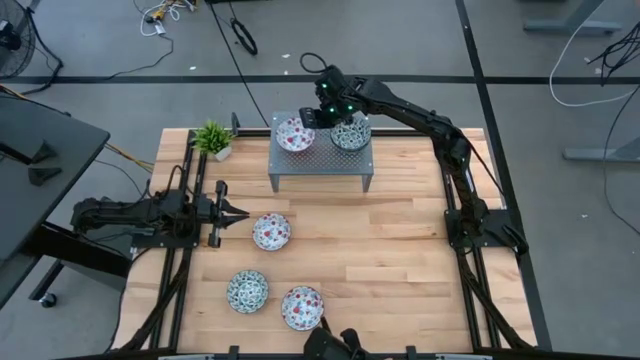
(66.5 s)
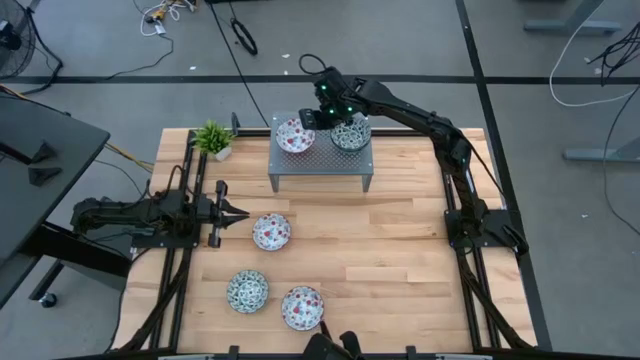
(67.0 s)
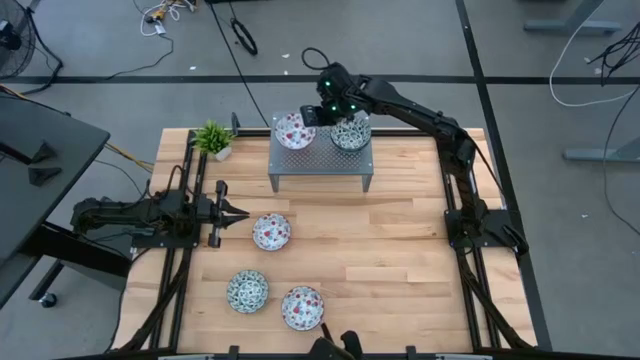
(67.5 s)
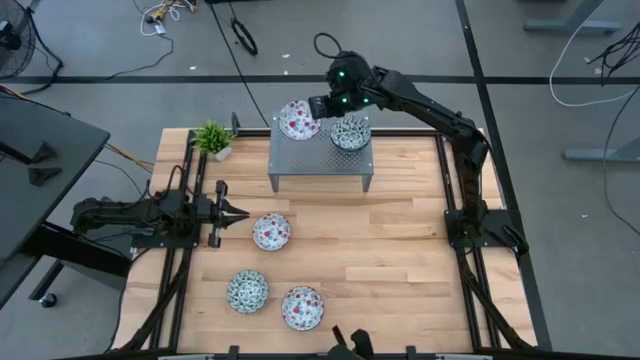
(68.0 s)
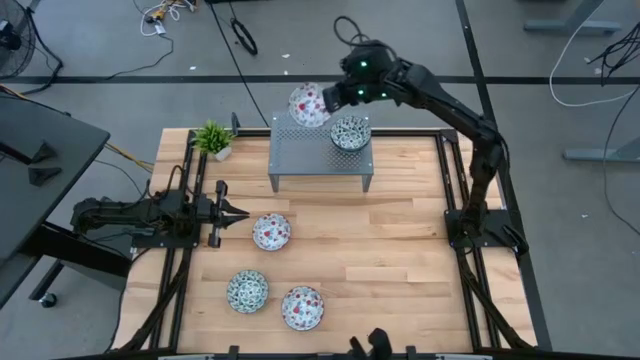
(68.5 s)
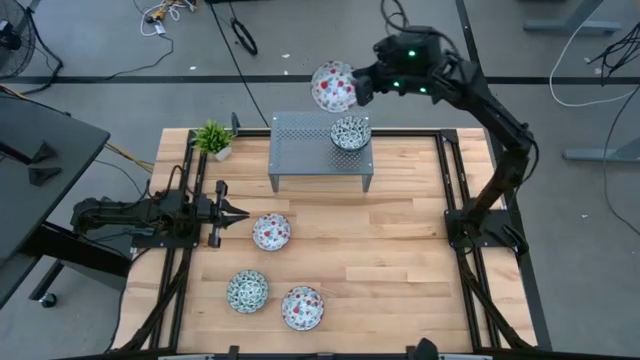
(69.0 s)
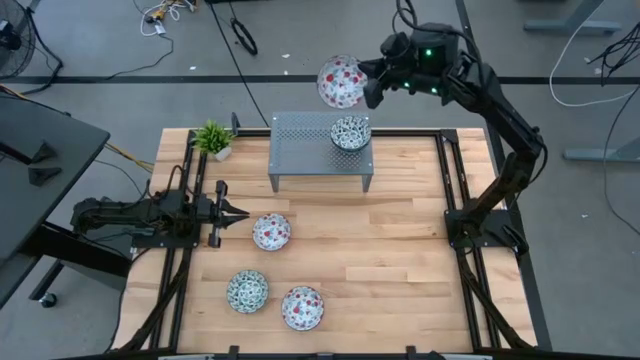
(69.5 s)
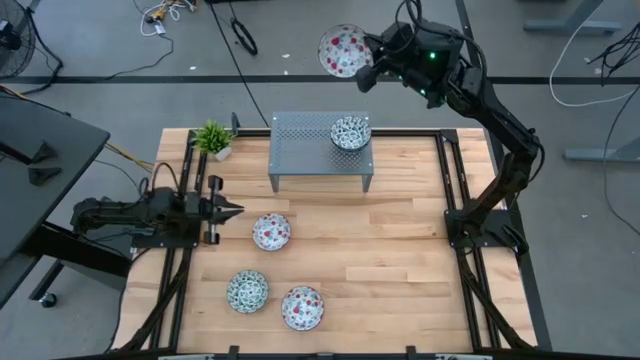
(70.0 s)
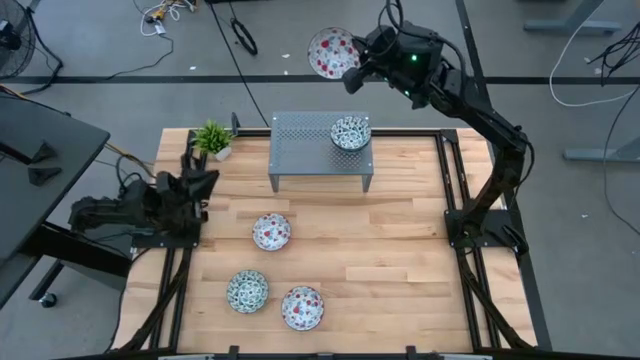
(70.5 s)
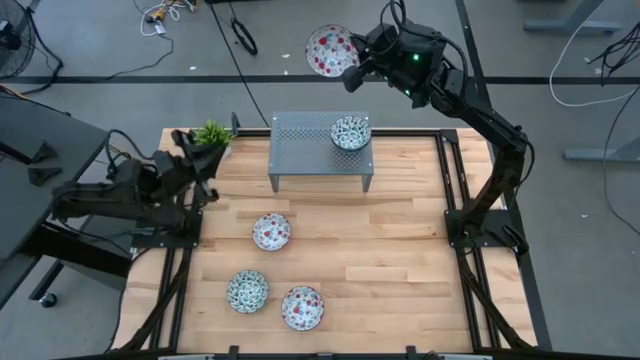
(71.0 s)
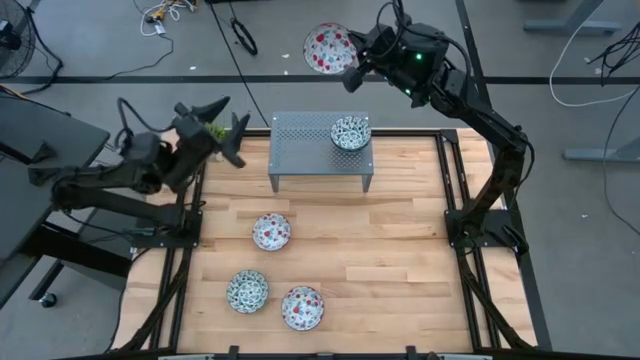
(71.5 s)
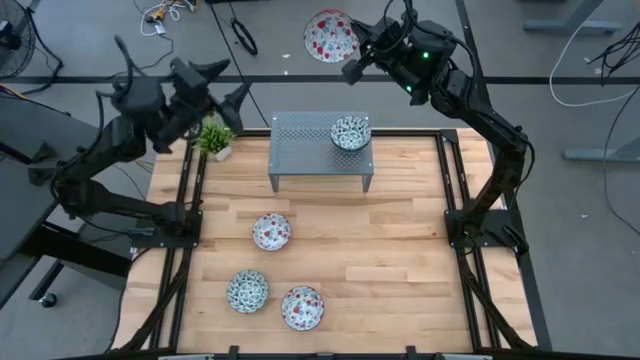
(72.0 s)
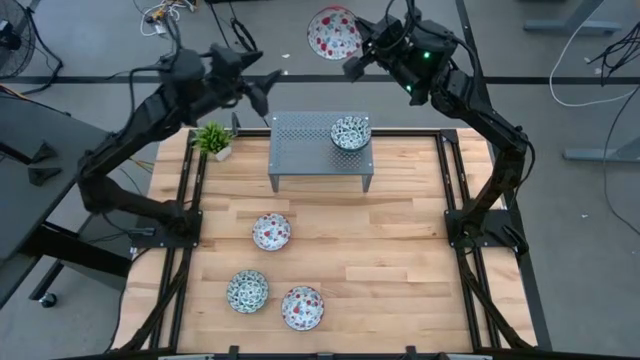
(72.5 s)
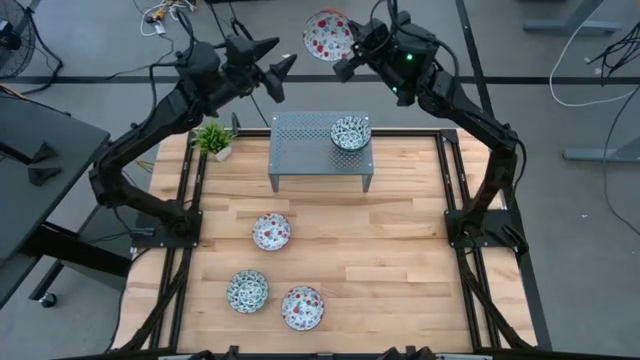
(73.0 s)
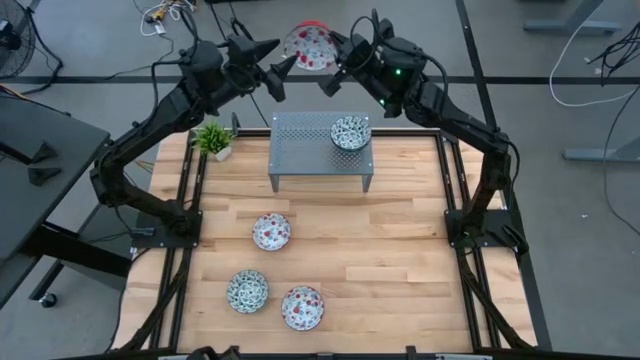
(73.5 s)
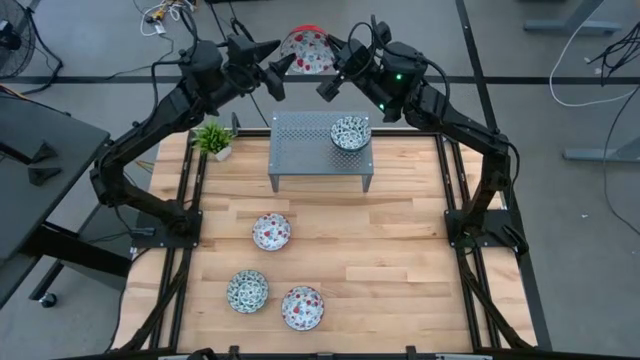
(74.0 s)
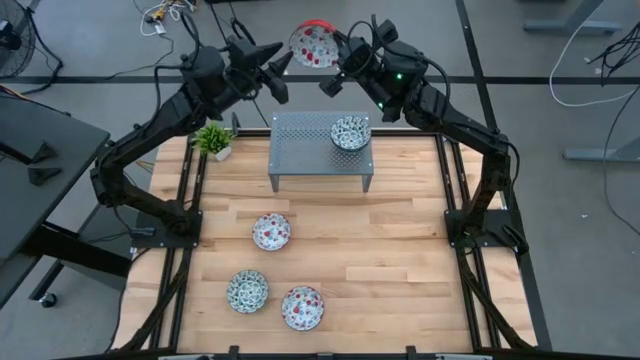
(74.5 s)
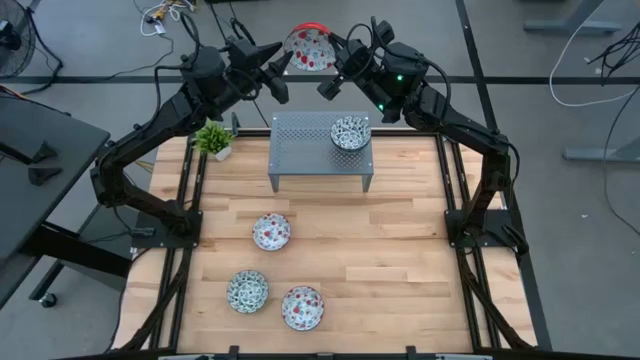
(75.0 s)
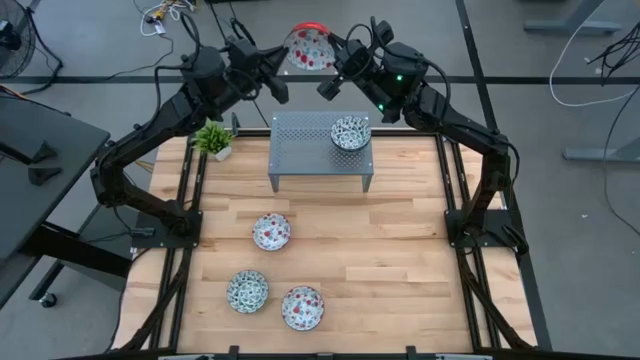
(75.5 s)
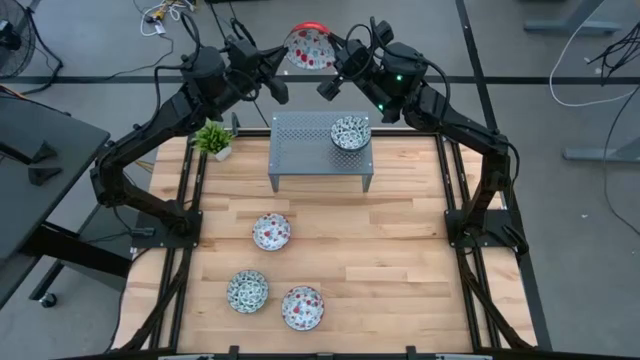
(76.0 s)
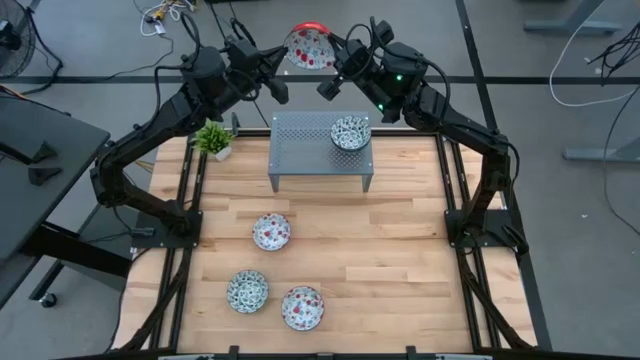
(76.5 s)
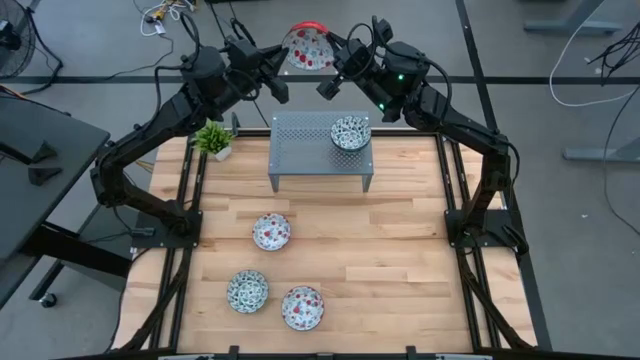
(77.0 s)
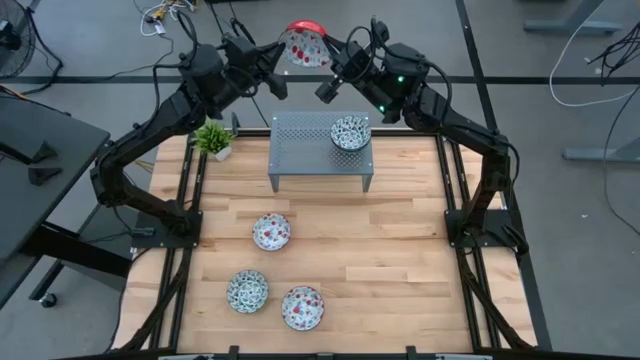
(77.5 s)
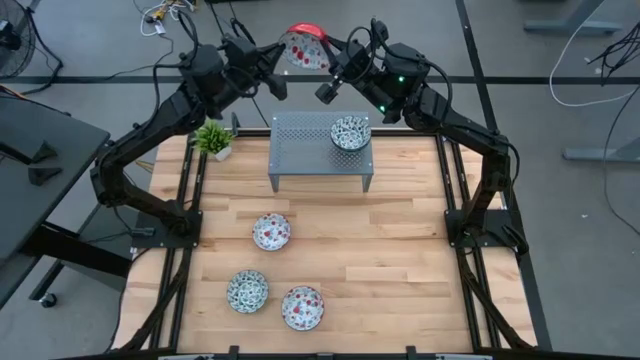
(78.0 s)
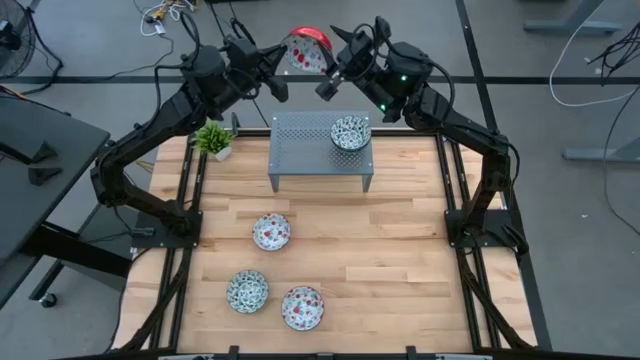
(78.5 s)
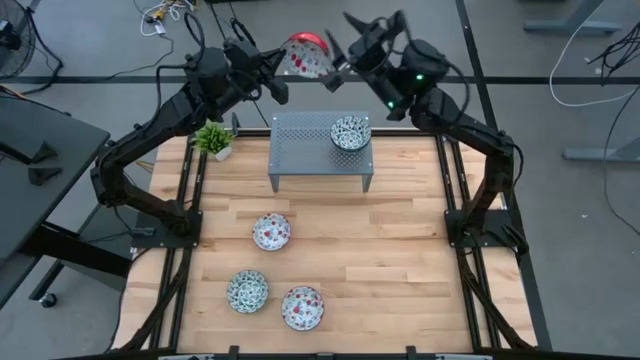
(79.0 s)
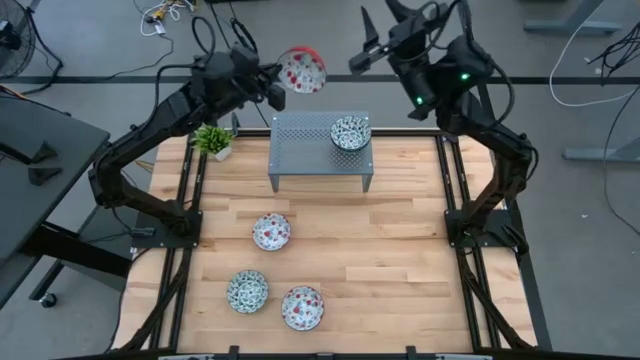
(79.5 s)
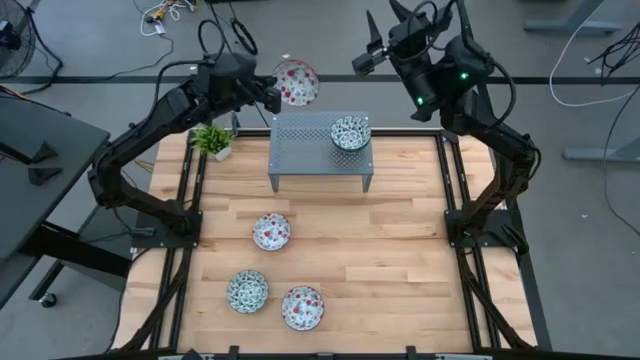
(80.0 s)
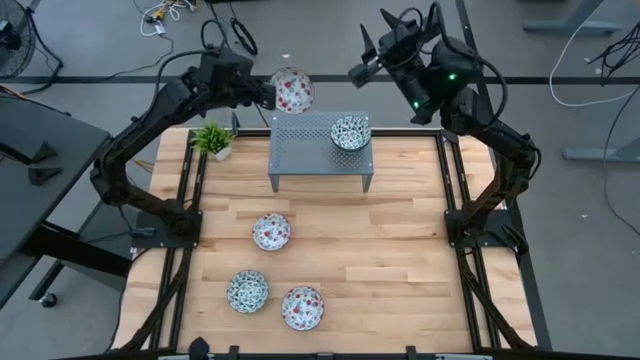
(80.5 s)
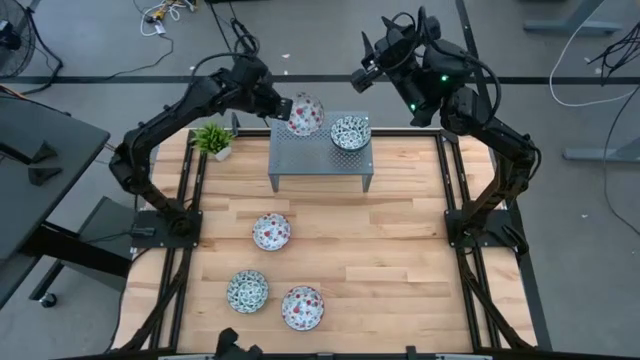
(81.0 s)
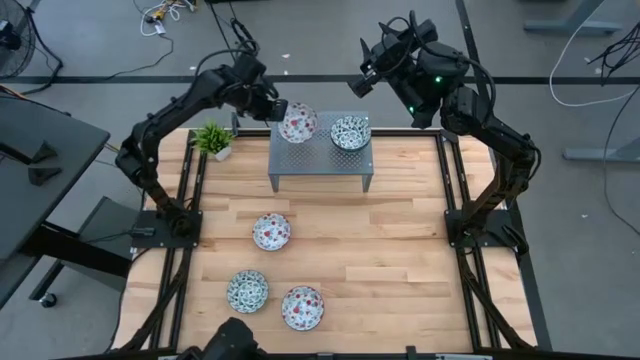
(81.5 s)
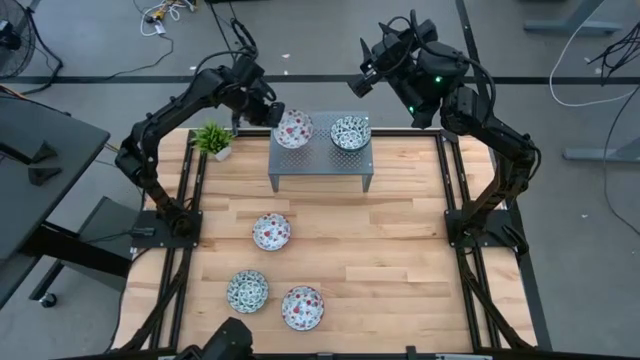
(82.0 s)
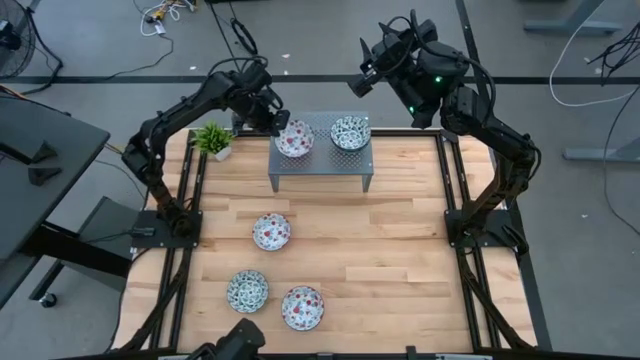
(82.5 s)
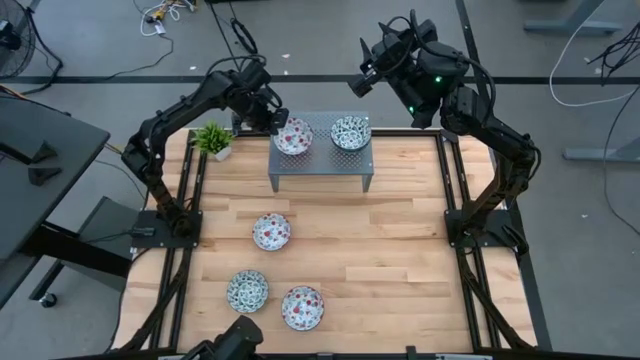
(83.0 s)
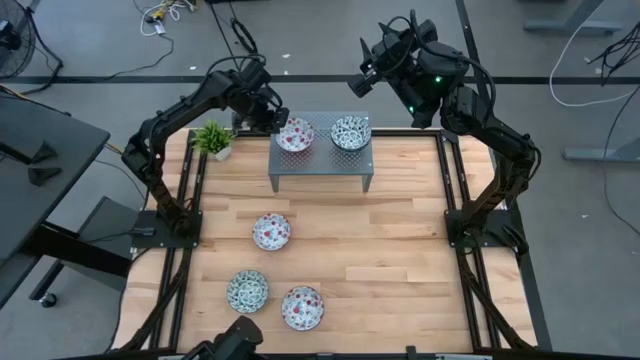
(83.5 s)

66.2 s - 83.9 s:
Task: Pick & Place Mini bowls
Put the right red and white patterned bowl on the shelf
